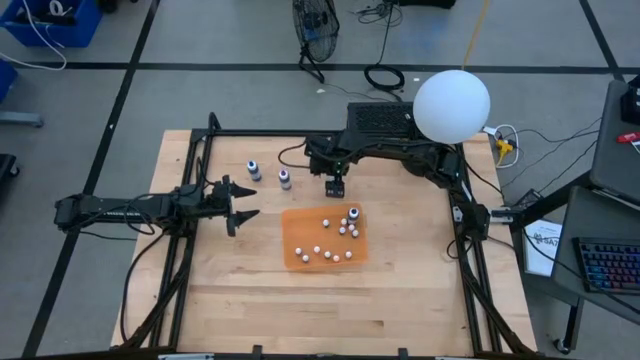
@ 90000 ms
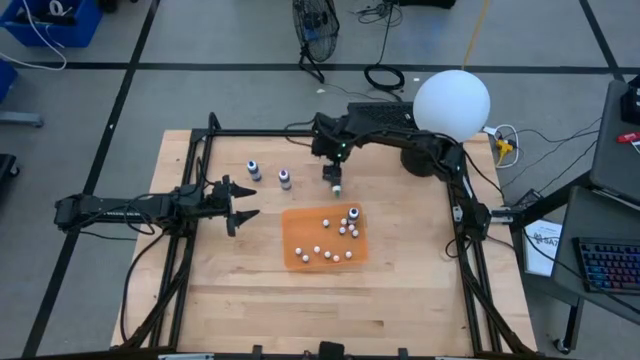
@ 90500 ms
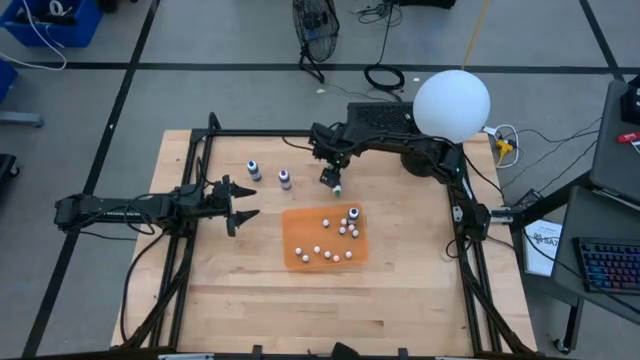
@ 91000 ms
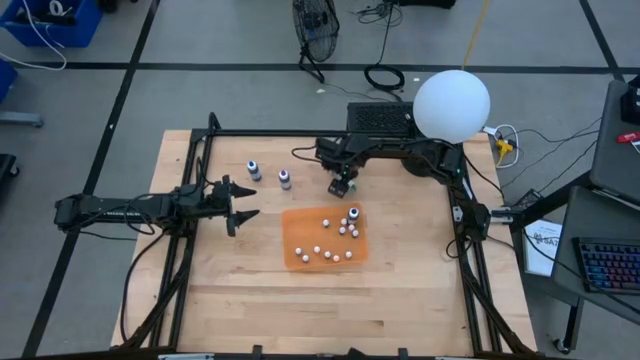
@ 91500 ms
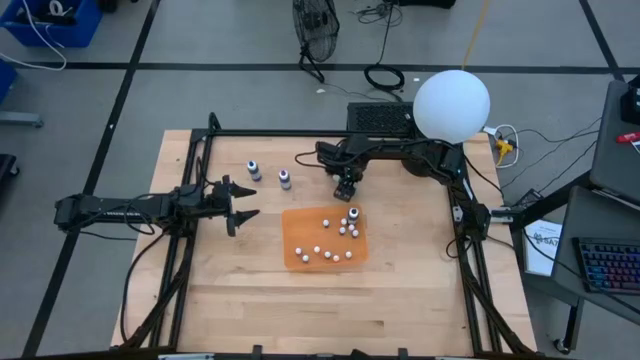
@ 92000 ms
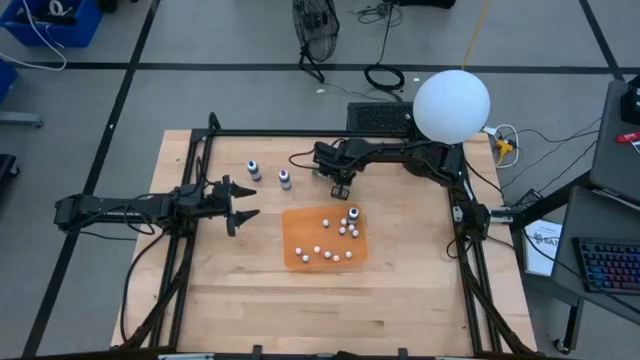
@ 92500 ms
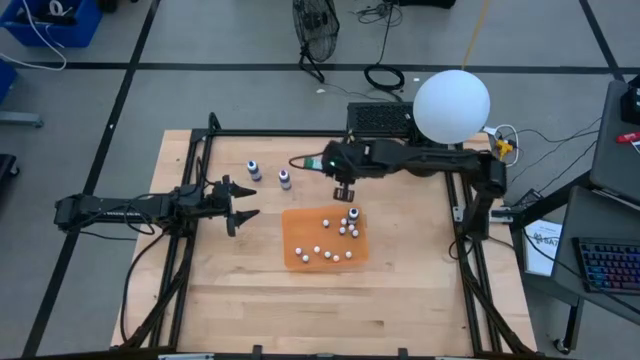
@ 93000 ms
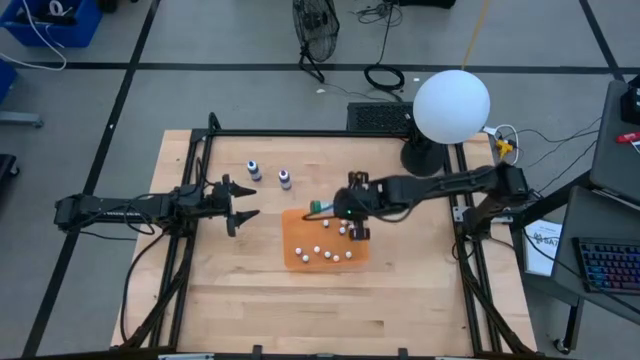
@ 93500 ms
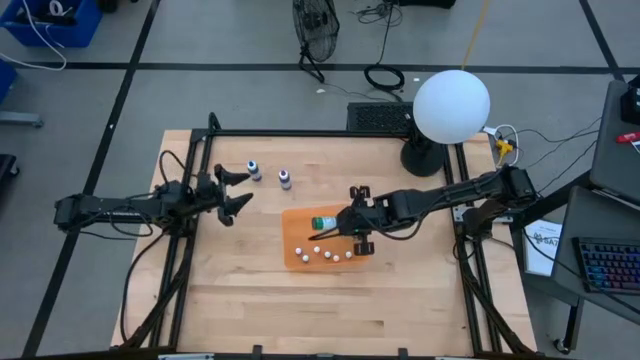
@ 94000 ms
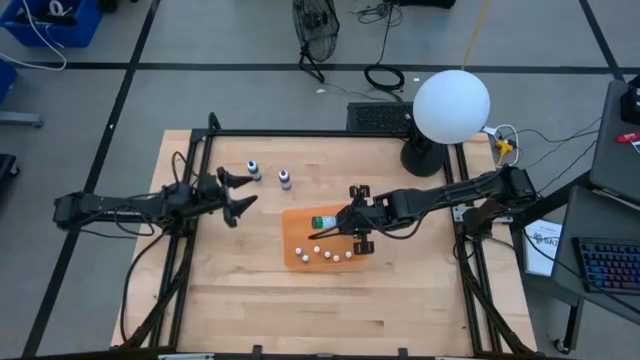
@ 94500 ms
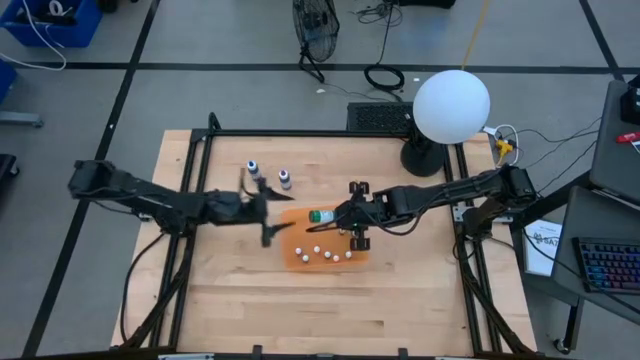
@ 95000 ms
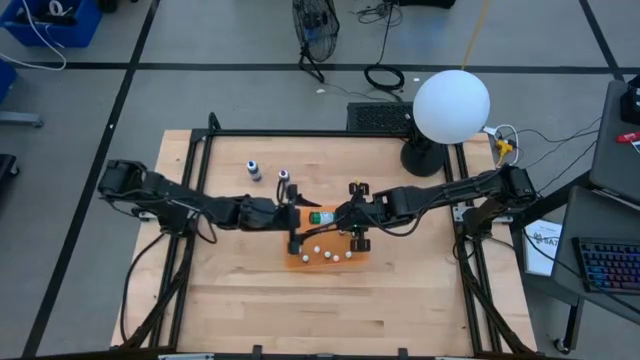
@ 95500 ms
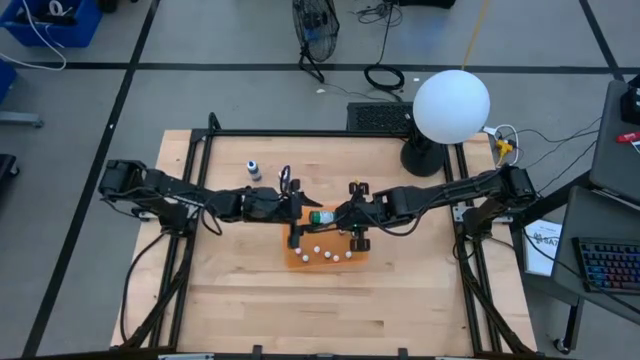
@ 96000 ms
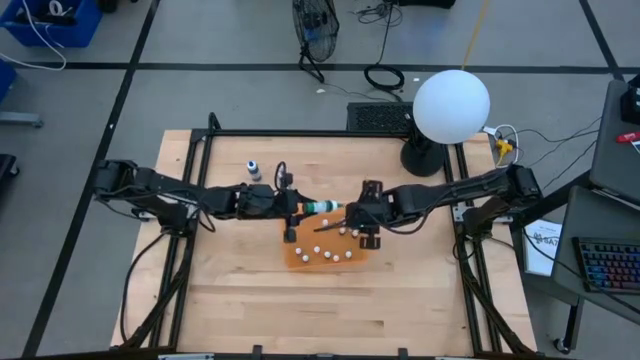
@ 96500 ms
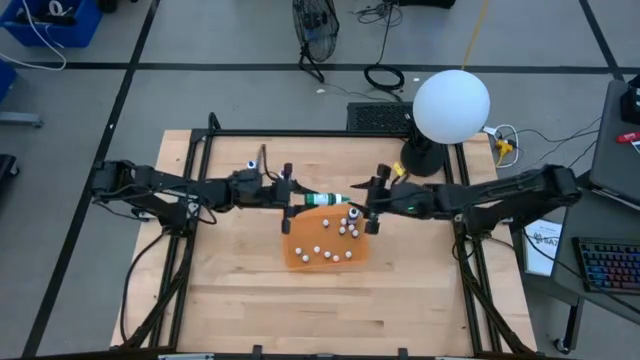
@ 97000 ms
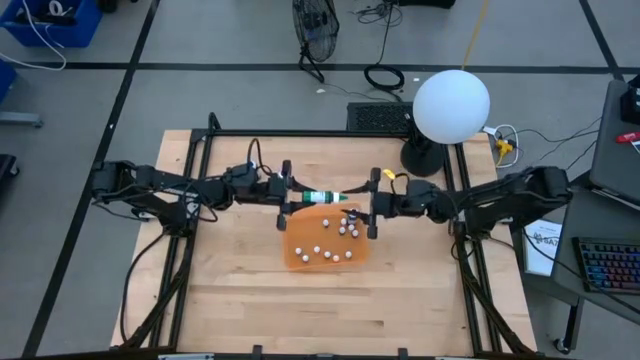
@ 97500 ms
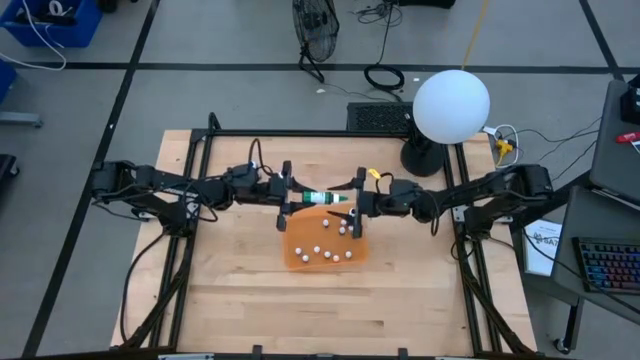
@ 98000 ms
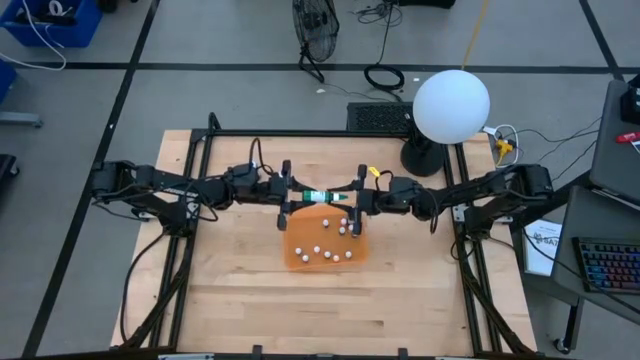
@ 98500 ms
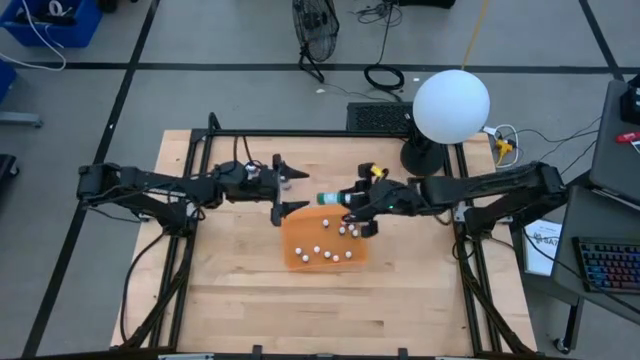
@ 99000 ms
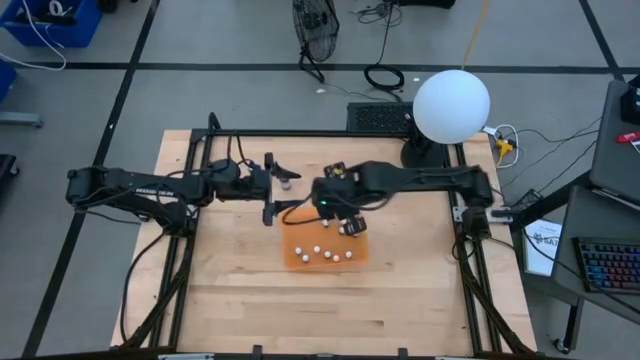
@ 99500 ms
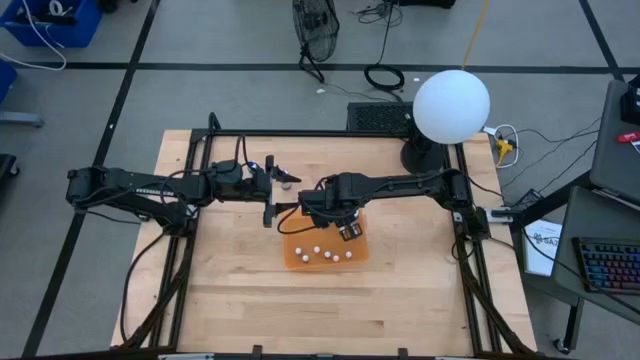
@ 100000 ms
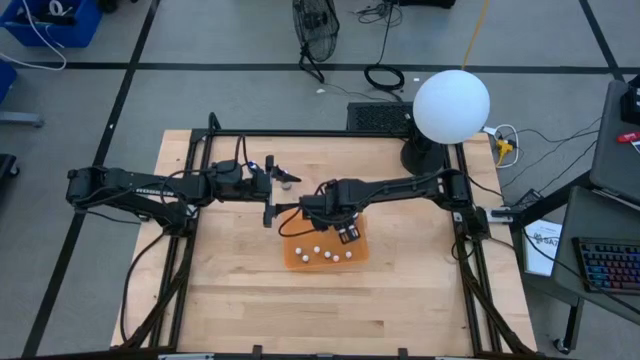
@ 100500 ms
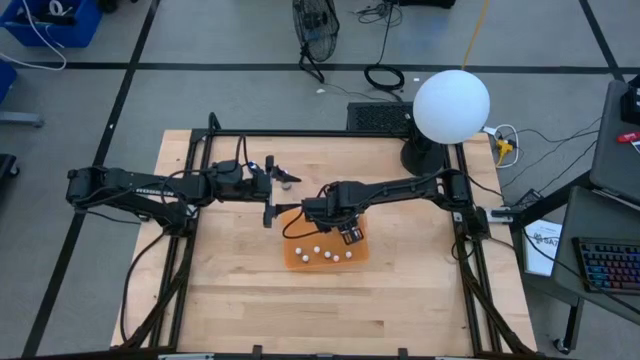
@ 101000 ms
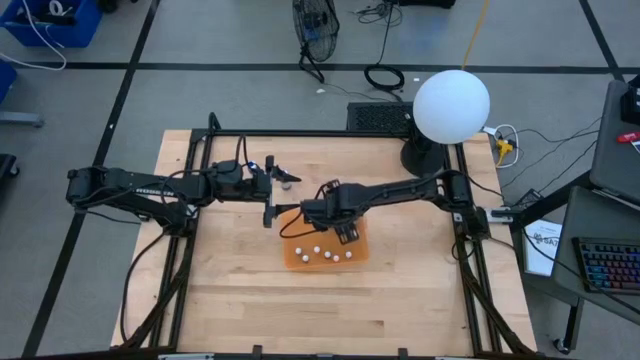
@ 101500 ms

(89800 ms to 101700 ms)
Task: Pick & Place food coloring
Put the big green food coloring bottle into the orange bin

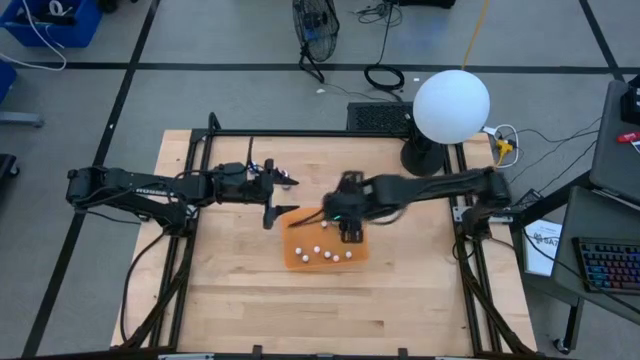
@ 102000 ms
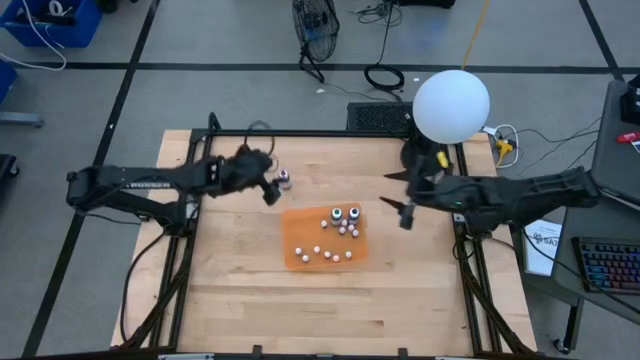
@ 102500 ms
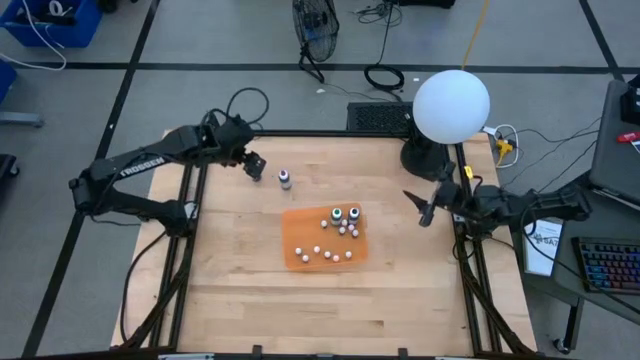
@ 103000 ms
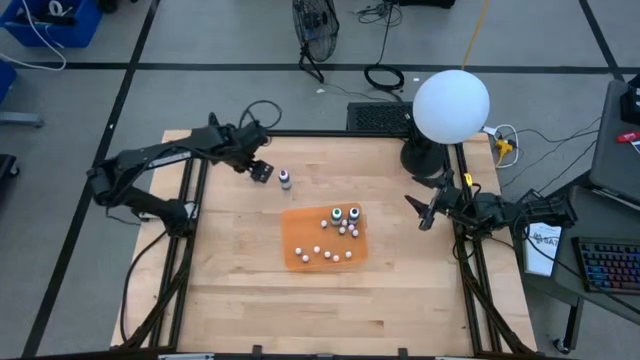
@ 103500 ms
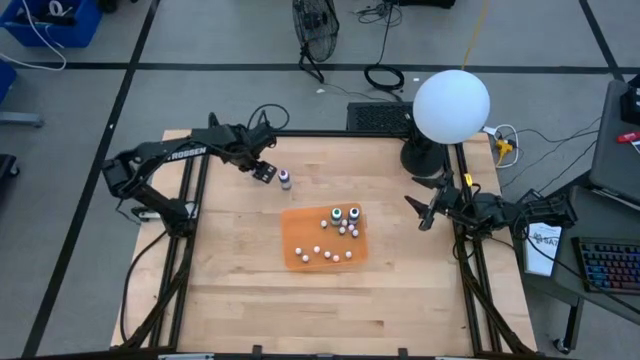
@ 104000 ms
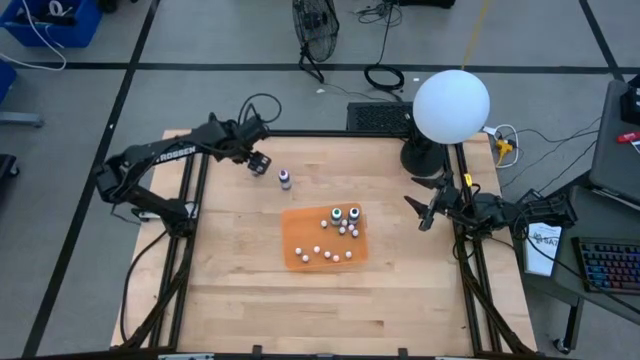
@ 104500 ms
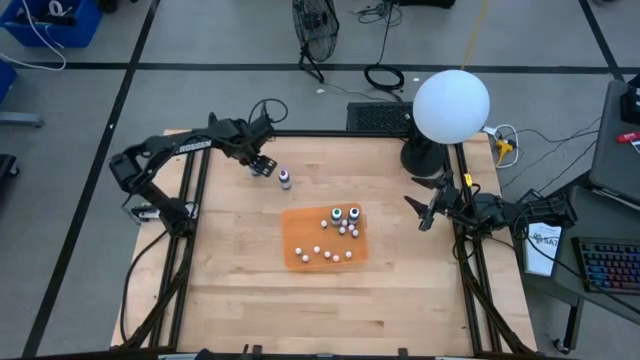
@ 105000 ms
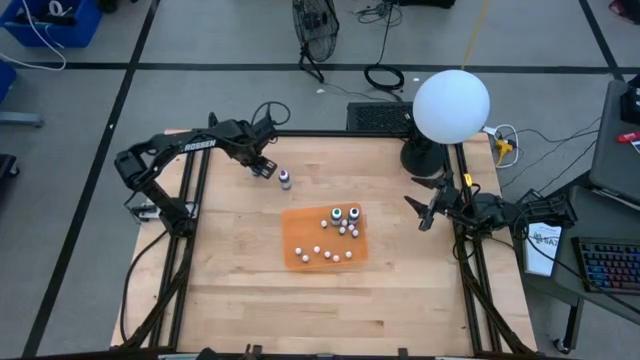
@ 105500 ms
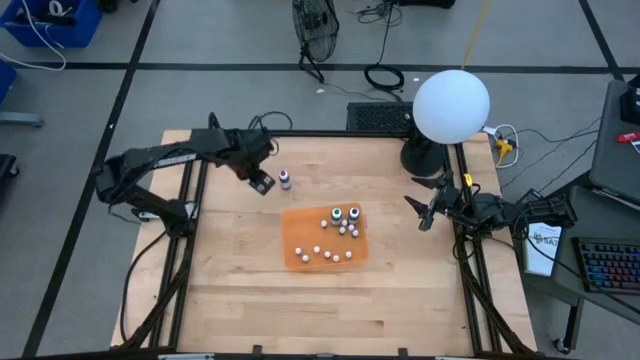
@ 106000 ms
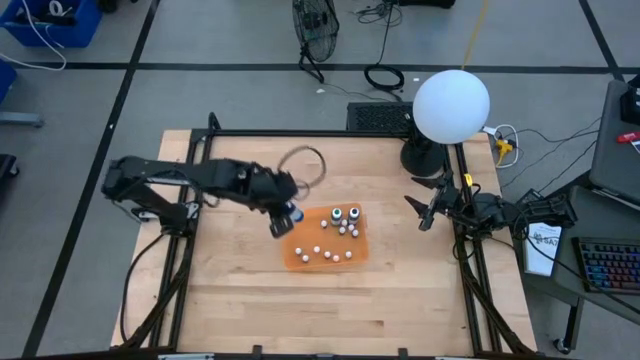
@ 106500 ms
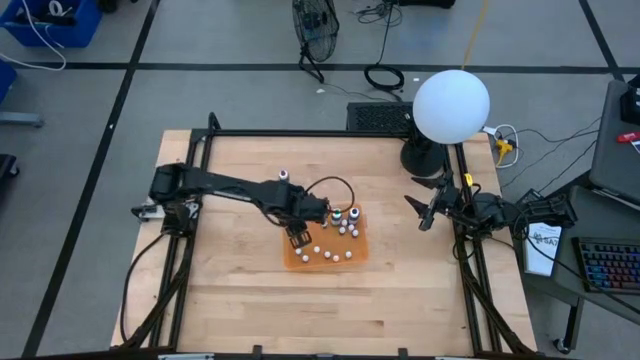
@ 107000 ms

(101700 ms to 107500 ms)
Put the big blue food coloring bottle into the orange bin

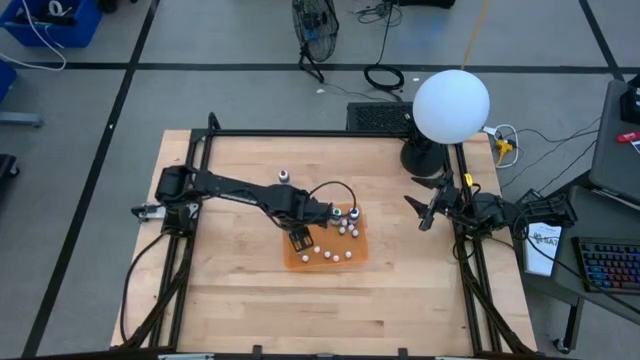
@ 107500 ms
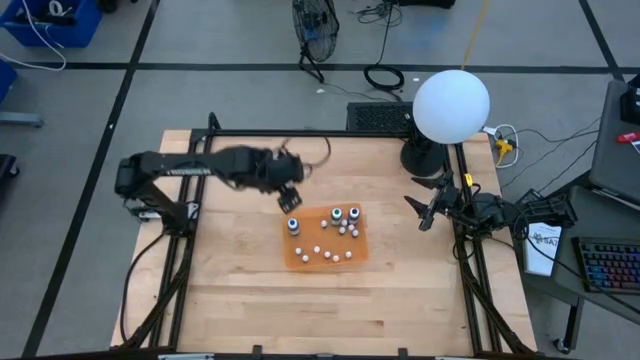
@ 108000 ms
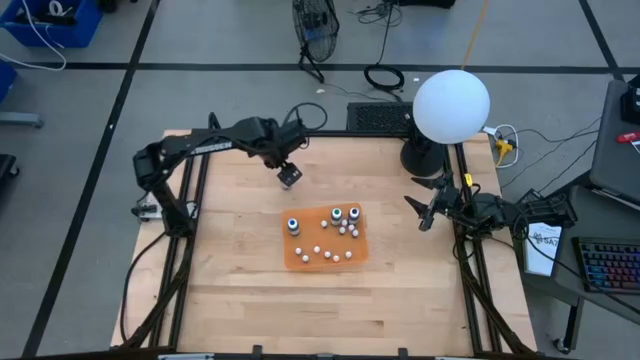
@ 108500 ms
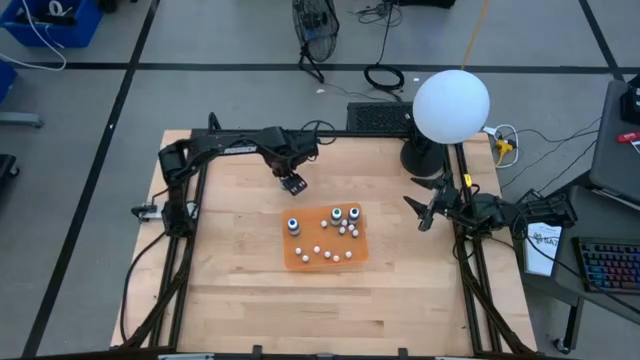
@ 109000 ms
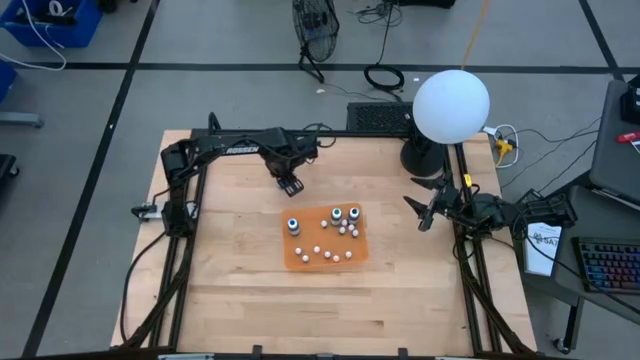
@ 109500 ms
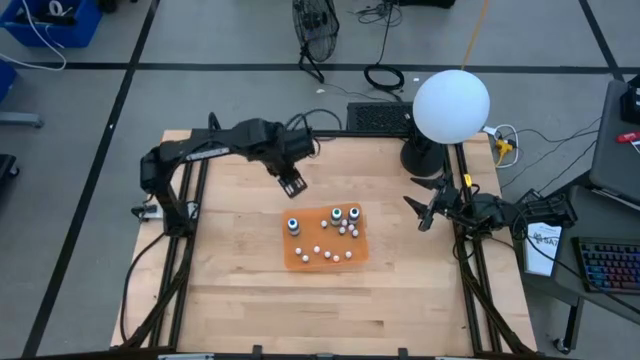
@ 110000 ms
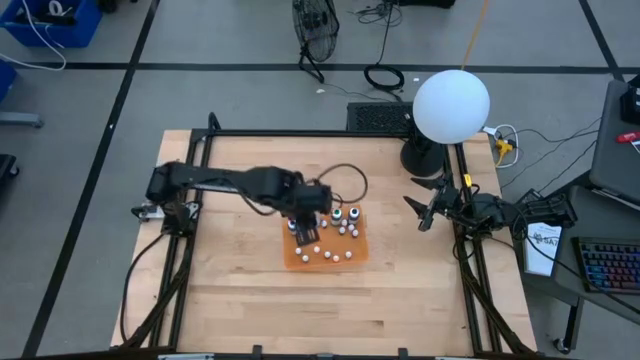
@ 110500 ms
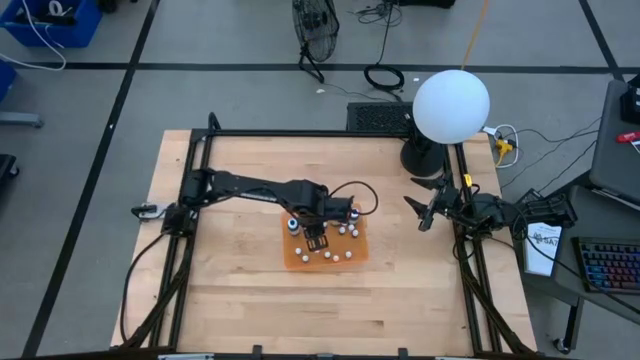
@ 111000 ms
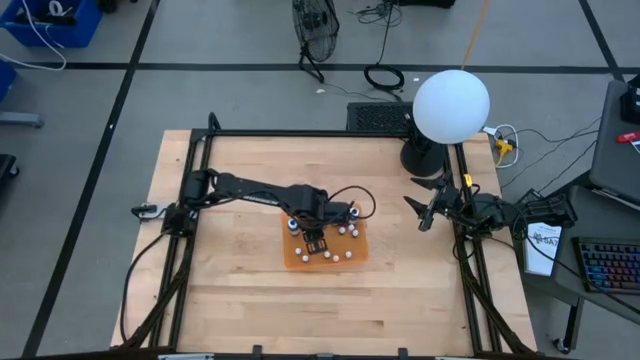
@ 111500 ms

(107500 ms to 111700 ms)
Put the big purple food coloring bottle into the orange bin
